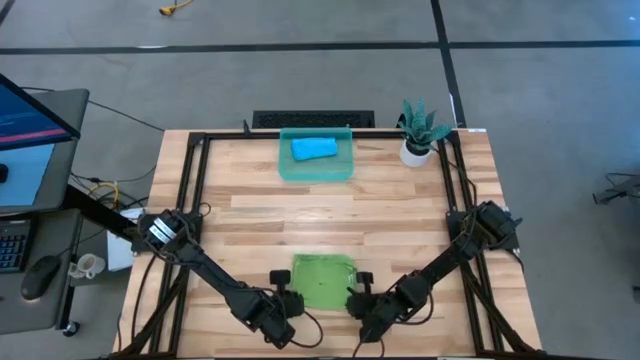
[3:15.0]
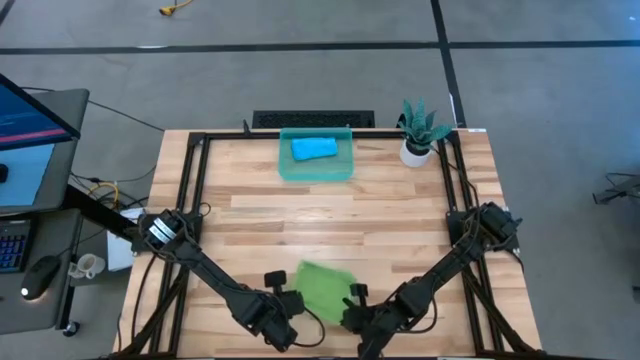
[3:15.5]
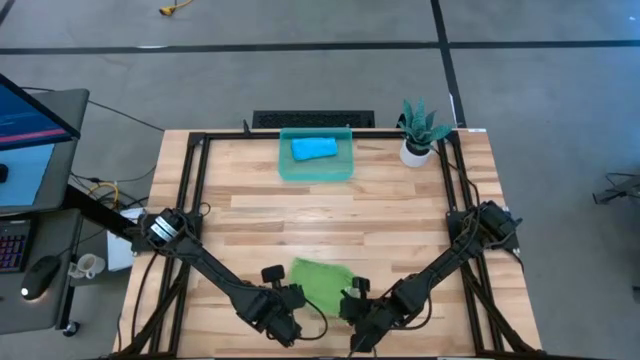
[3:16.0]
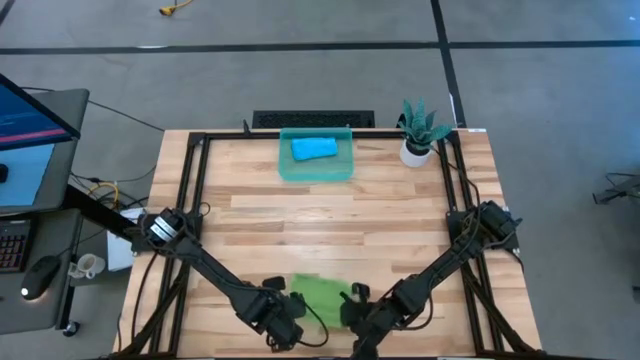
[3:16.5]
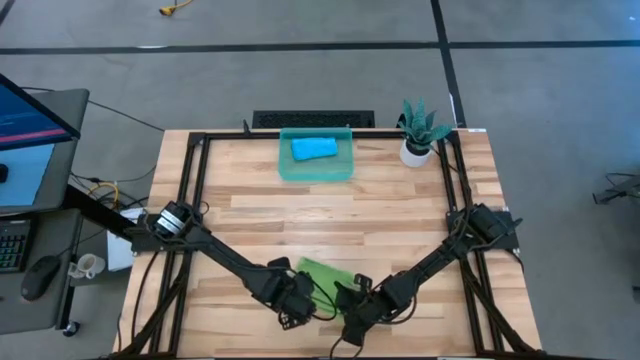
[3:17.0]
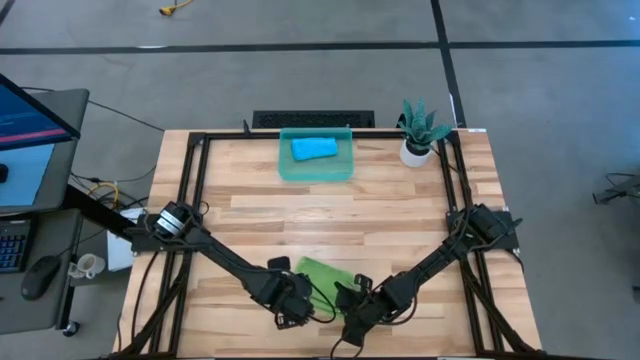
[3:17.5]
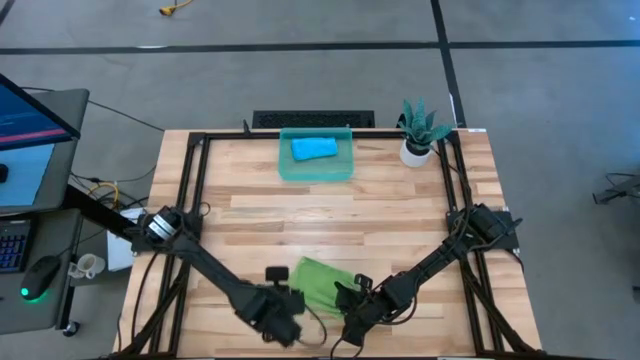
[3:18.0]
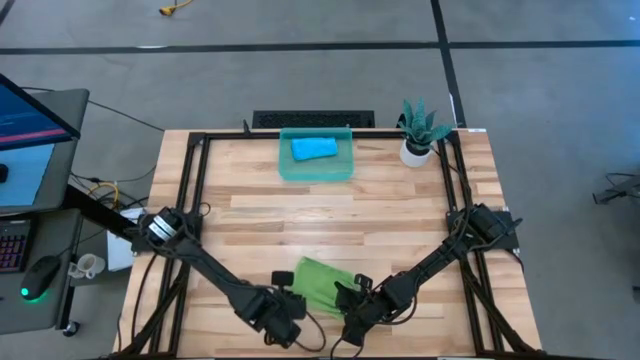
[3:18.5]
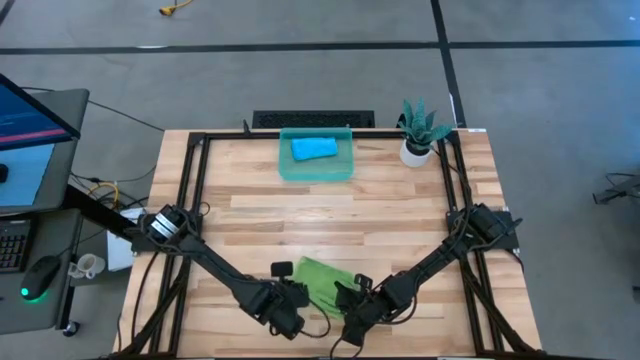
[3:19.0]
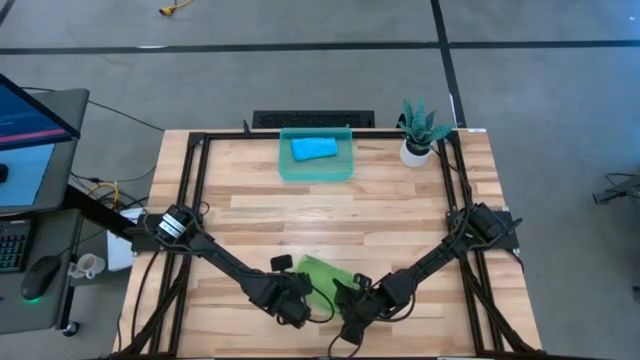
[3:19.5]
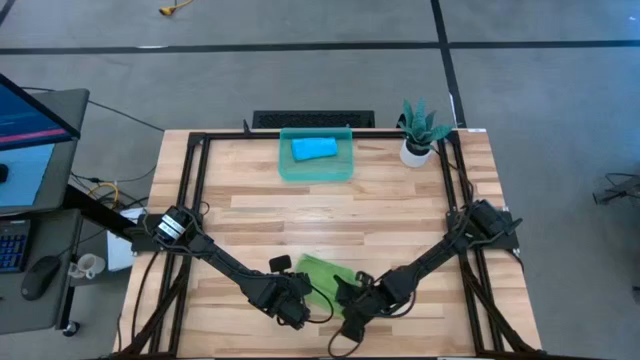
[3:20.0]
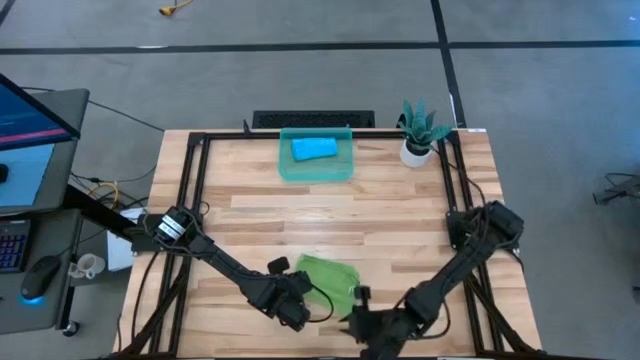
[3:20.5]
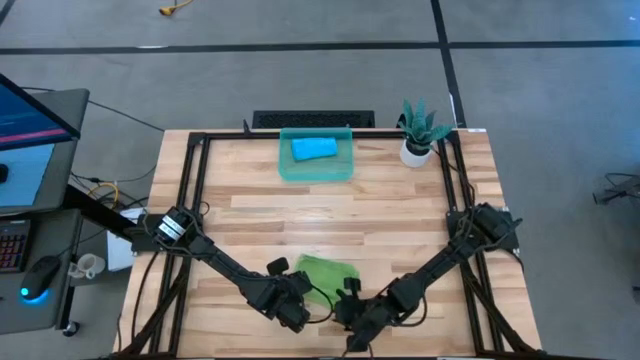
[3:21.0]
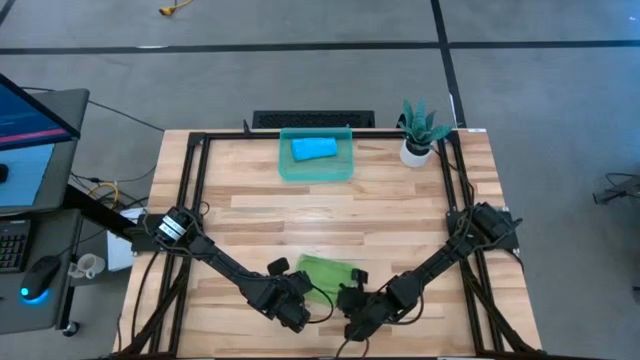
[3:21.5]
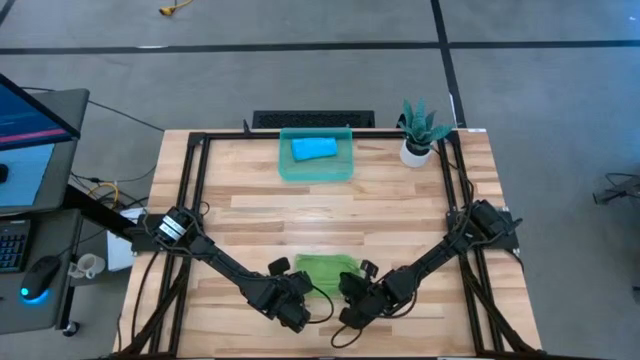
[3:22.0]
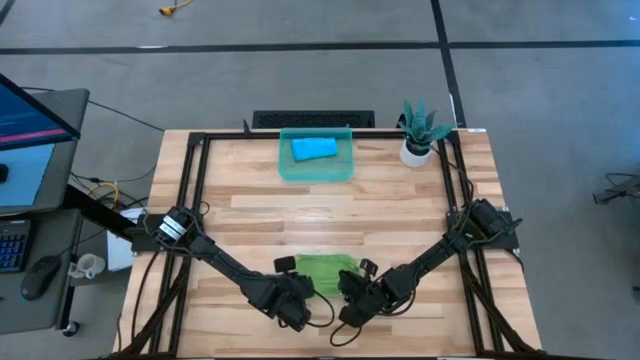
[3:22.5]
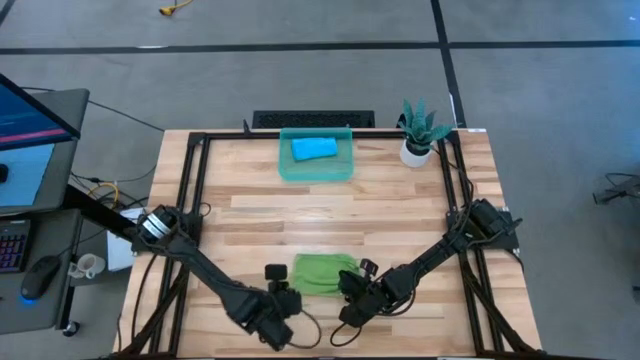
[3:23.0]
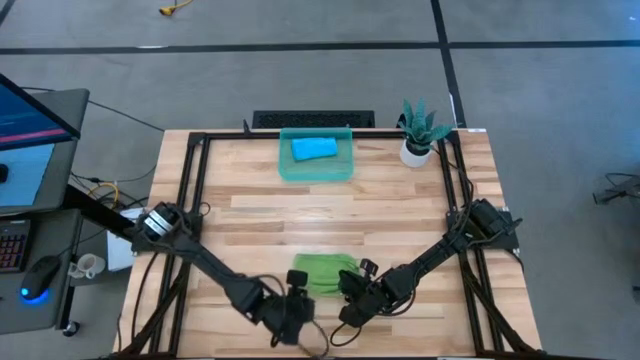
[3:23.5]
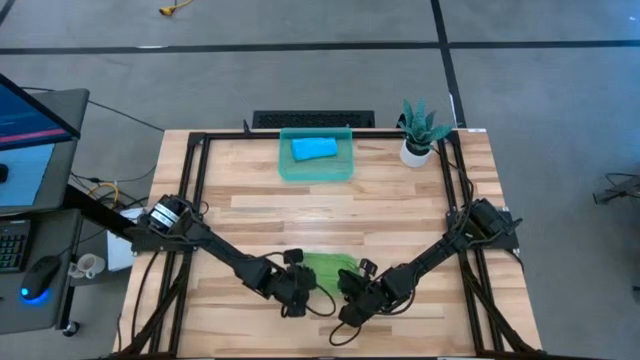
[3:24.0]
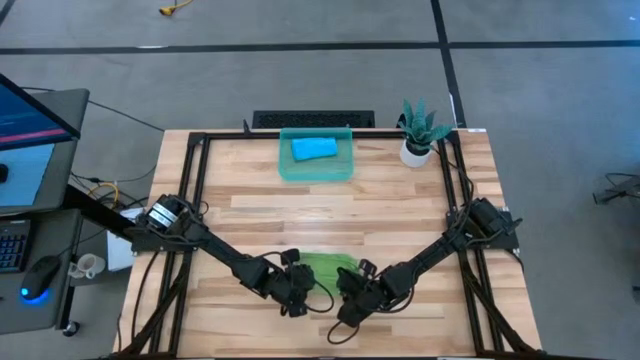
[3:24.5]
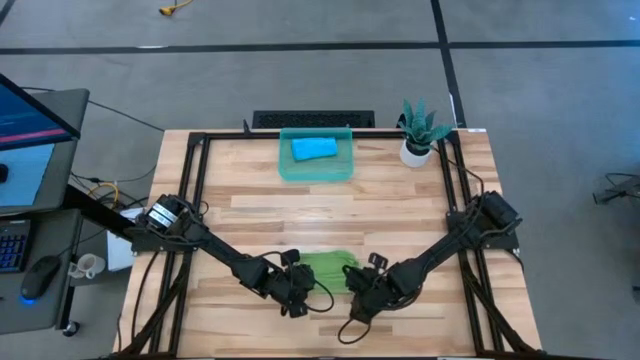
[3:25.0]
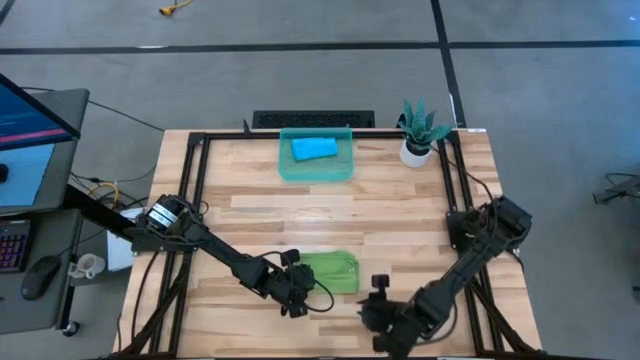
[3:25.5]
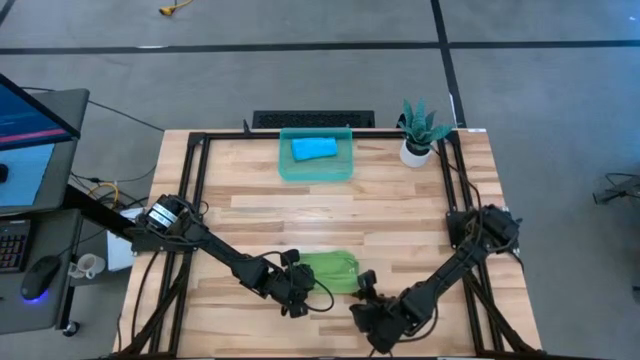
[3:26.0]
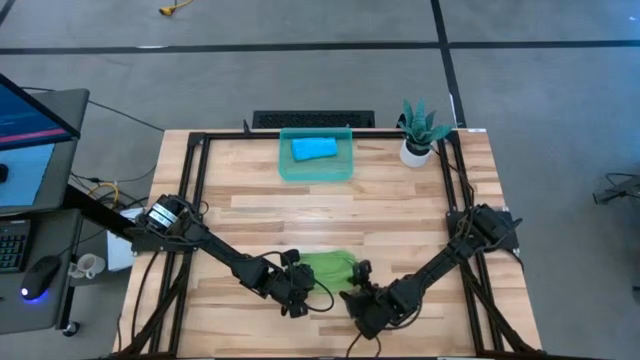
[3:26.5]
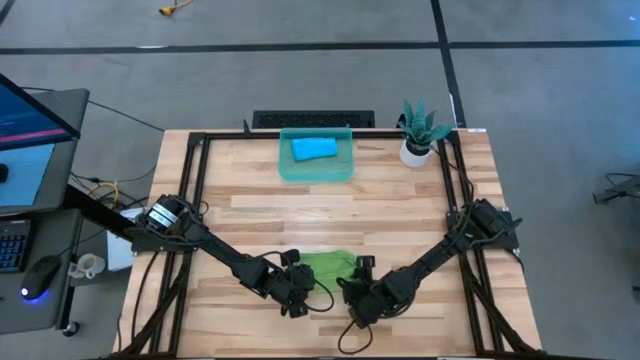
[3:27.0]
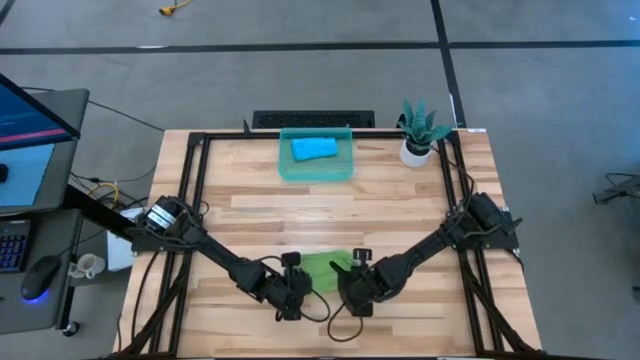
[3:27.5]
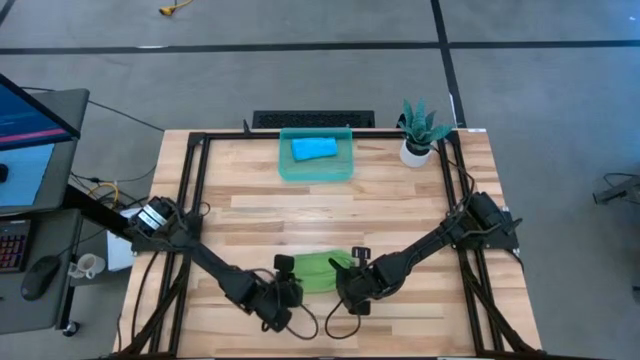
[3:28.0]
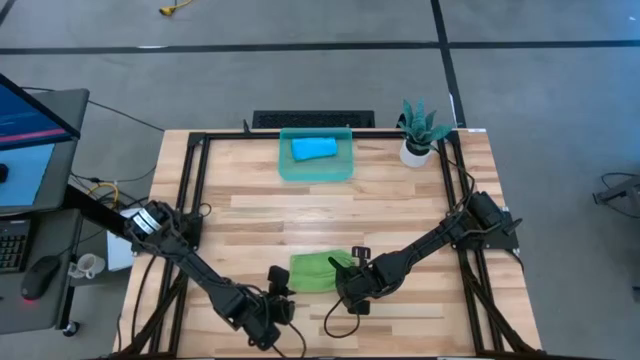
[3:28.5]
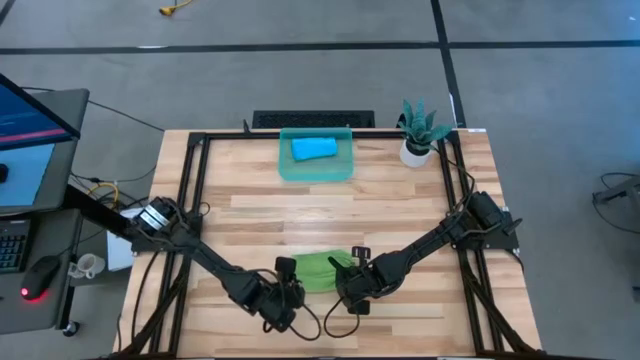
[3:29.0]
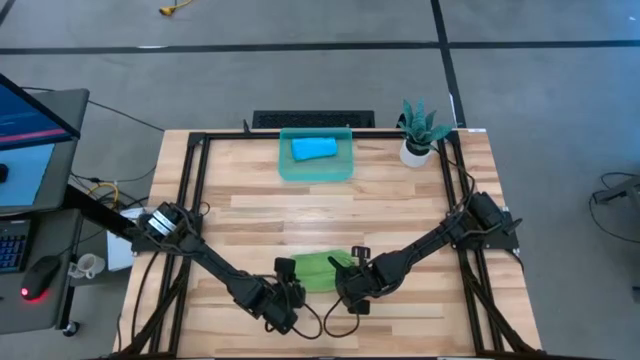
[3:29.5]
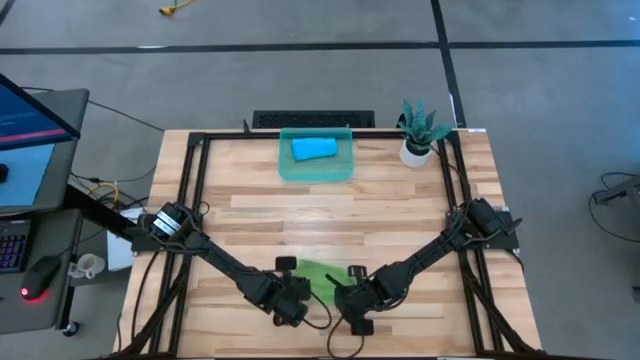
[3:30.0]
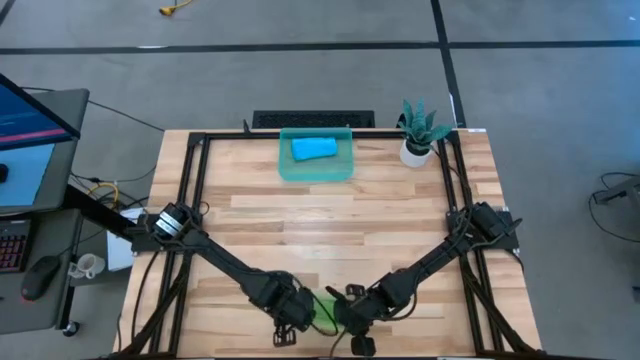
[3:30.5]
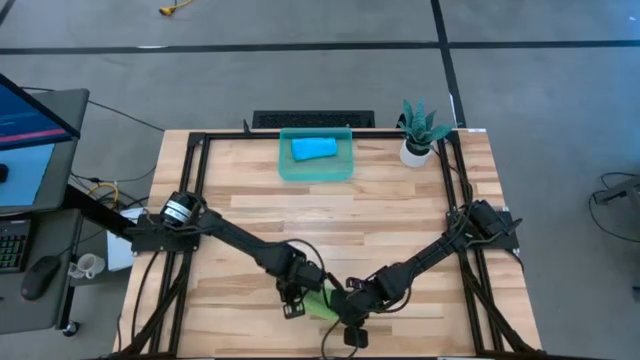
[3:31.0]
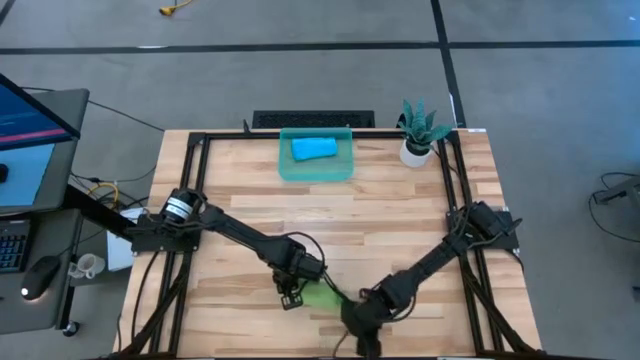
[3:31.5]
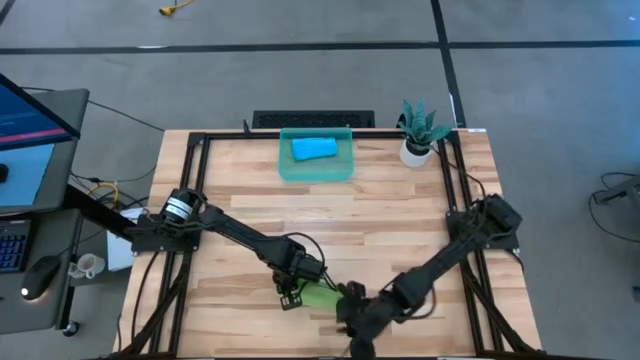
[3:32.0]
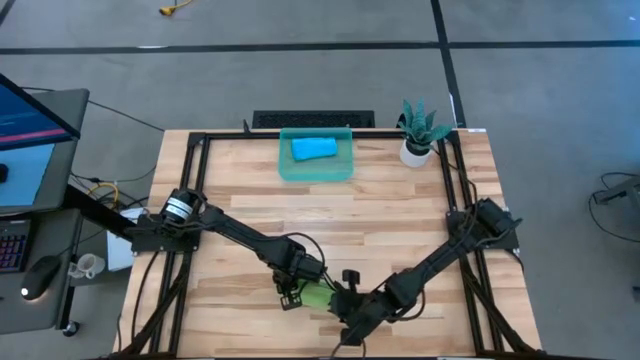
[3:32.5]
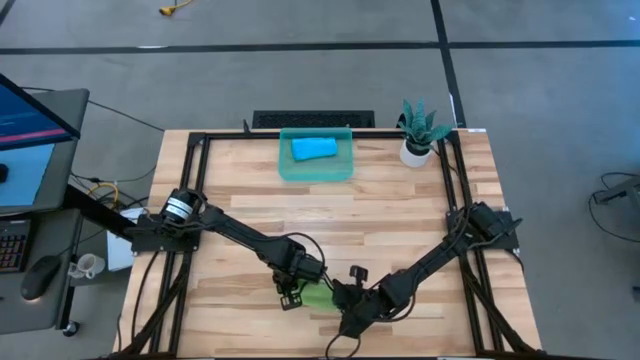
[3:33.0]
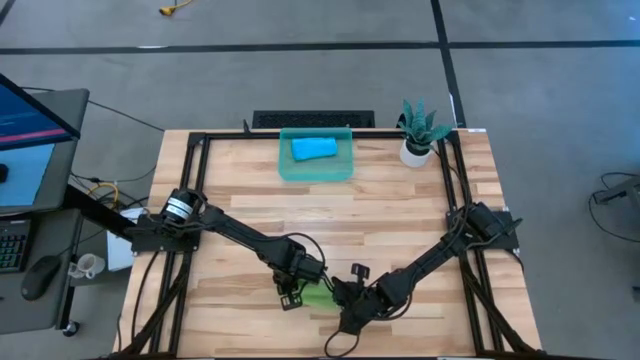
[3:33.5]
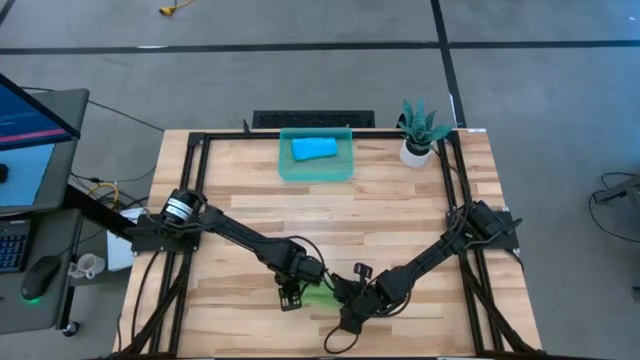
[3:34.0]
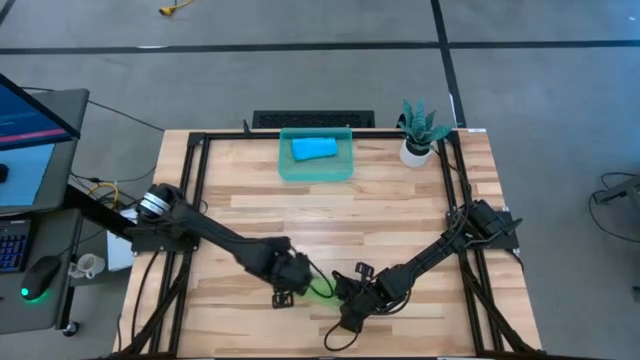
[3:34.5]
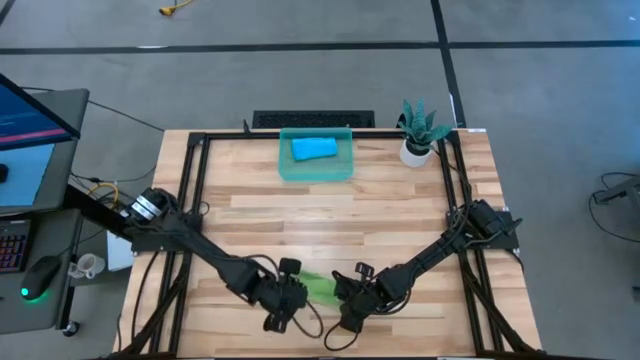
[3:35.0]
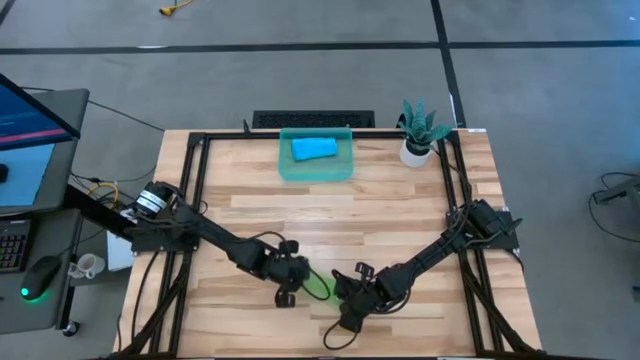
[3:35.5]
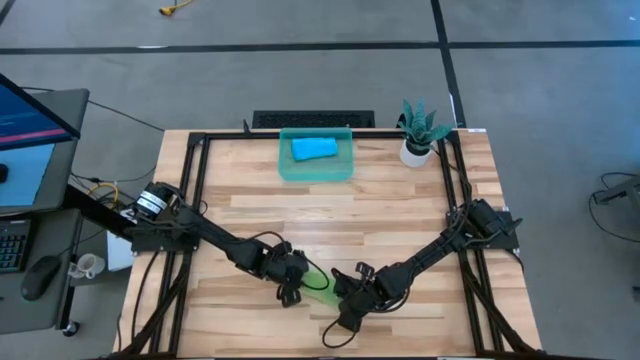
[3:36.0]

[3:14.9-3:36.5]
Task: Roll microfiber towels into tight, uniform cylinder then place into a basket
Roll the green microfiber cloth
